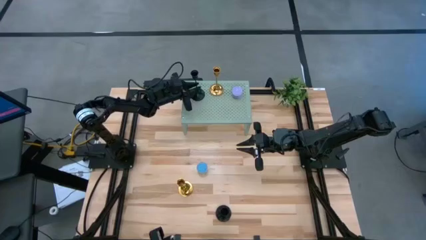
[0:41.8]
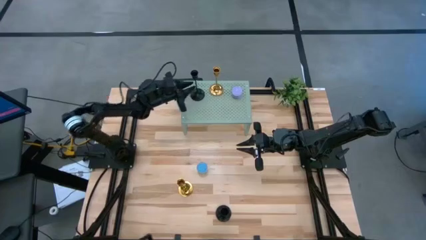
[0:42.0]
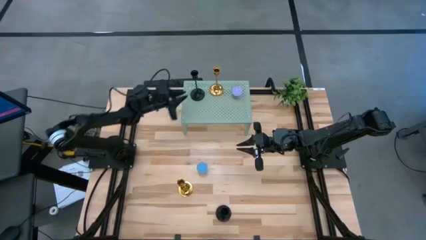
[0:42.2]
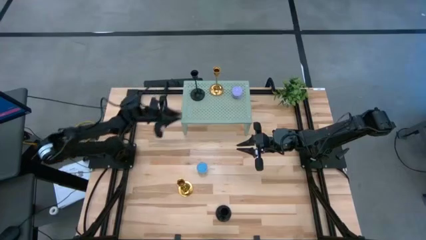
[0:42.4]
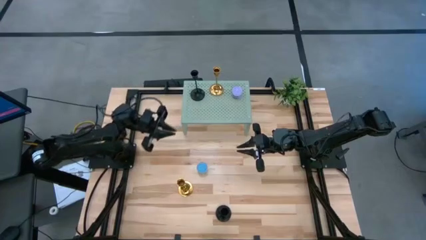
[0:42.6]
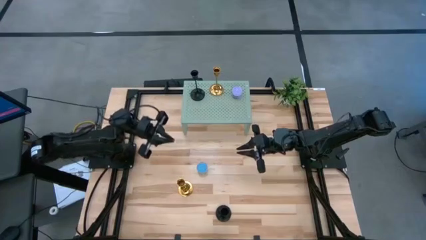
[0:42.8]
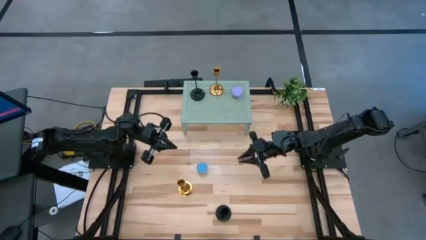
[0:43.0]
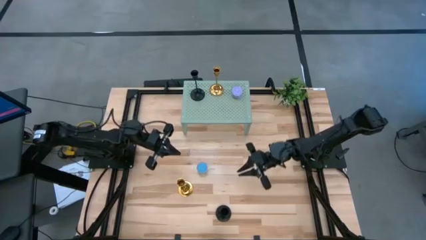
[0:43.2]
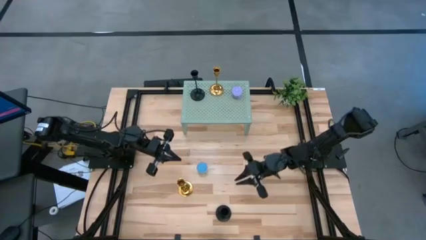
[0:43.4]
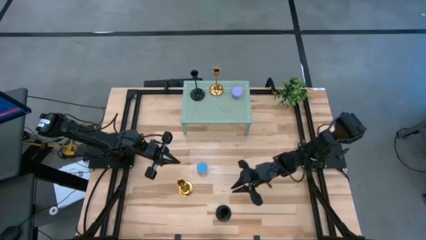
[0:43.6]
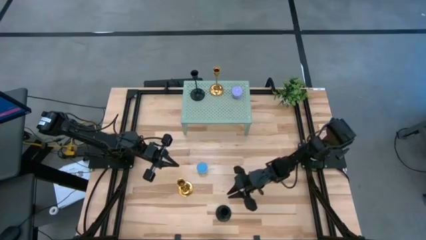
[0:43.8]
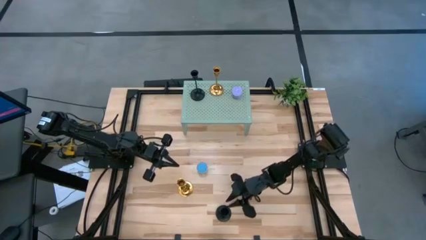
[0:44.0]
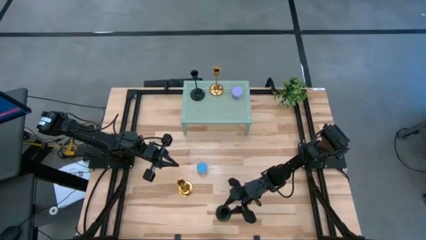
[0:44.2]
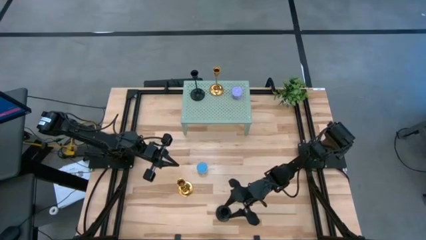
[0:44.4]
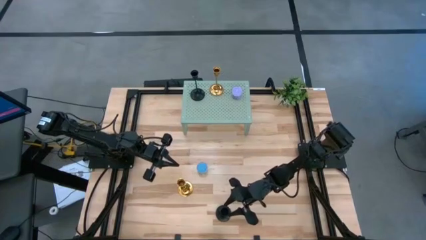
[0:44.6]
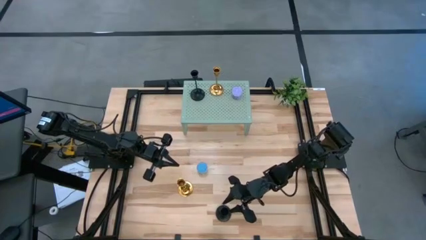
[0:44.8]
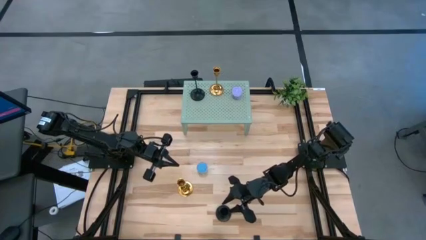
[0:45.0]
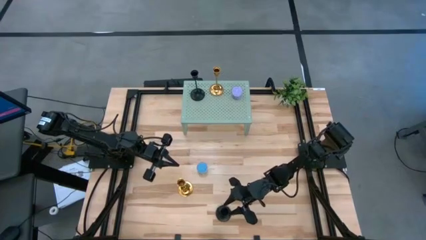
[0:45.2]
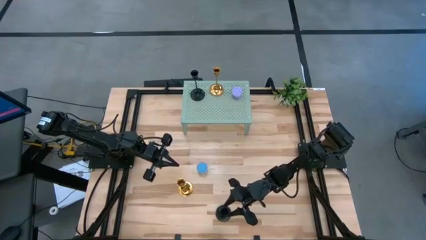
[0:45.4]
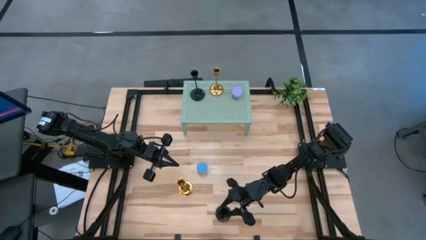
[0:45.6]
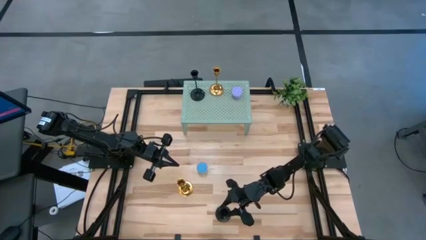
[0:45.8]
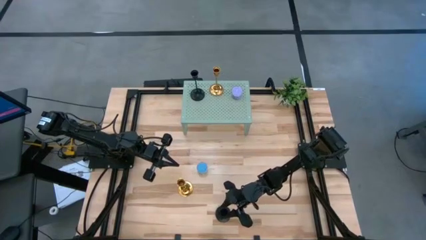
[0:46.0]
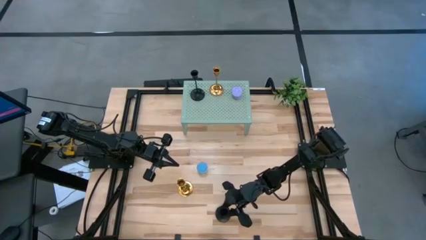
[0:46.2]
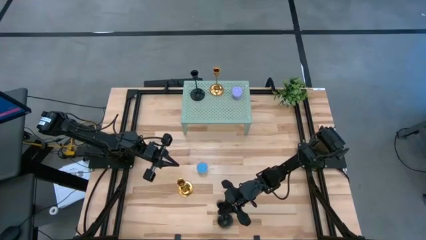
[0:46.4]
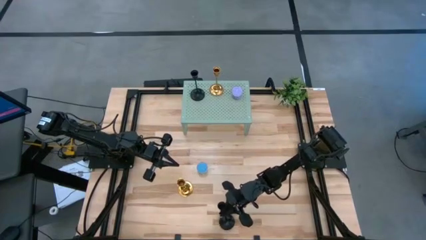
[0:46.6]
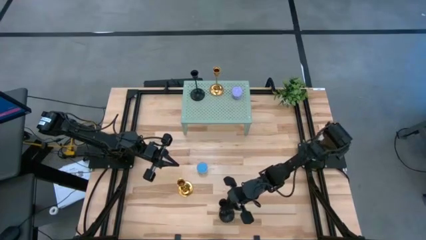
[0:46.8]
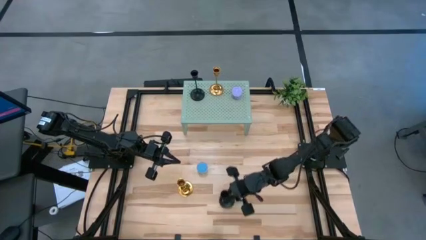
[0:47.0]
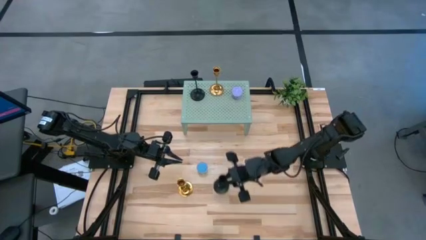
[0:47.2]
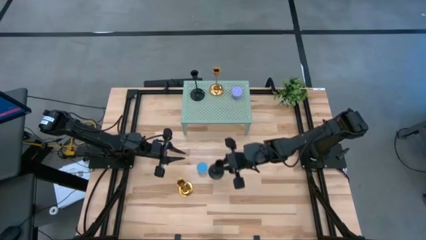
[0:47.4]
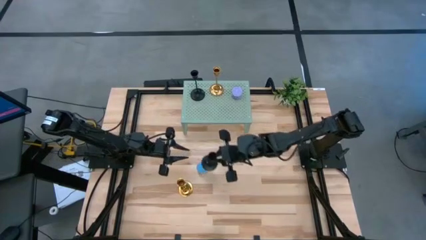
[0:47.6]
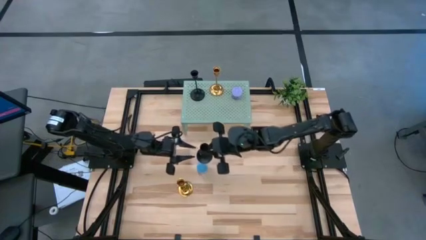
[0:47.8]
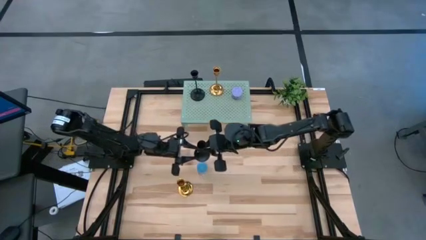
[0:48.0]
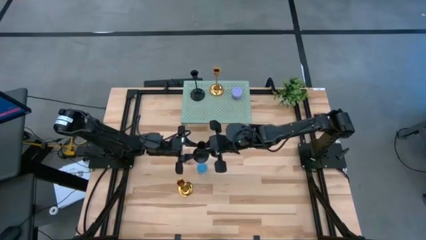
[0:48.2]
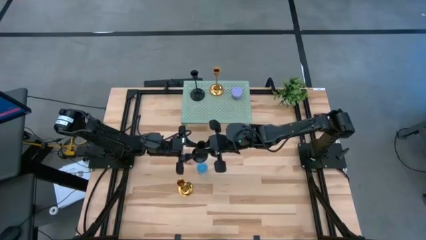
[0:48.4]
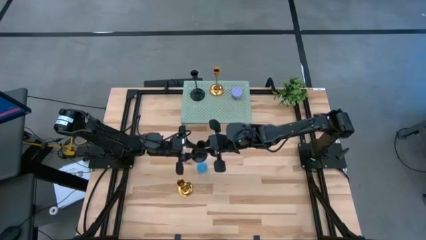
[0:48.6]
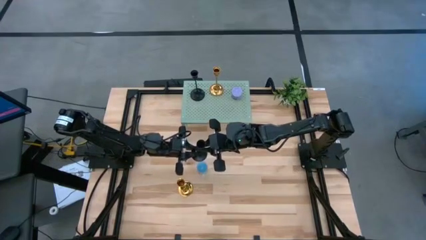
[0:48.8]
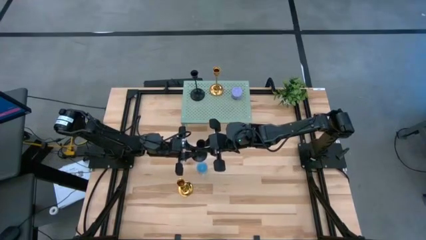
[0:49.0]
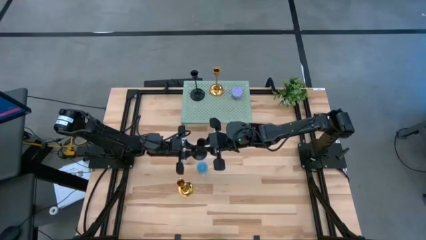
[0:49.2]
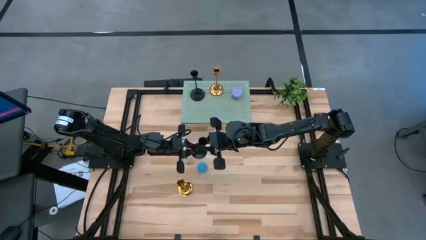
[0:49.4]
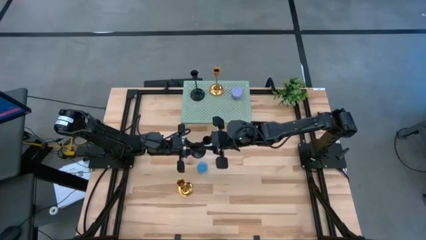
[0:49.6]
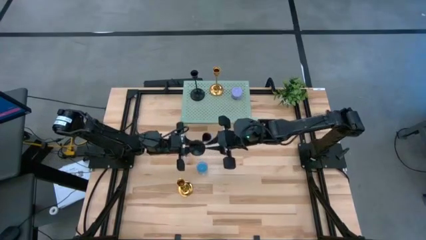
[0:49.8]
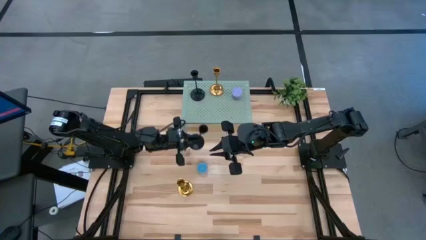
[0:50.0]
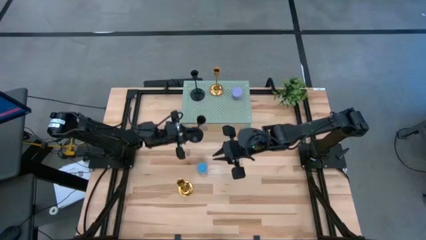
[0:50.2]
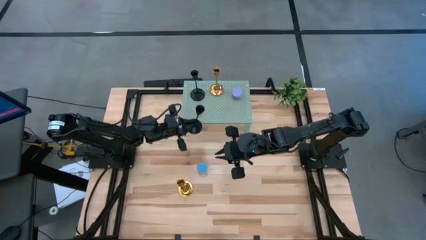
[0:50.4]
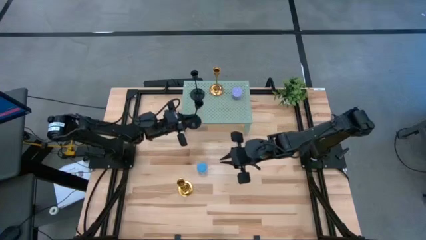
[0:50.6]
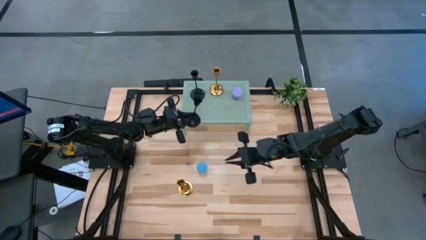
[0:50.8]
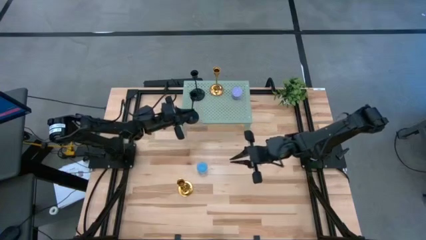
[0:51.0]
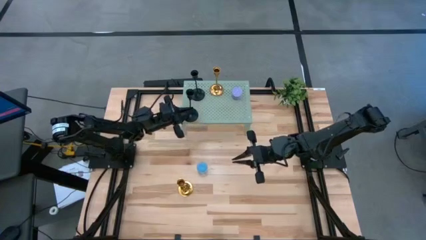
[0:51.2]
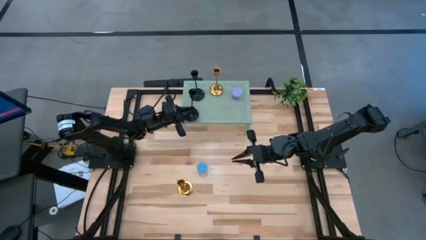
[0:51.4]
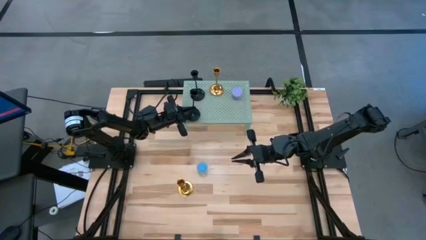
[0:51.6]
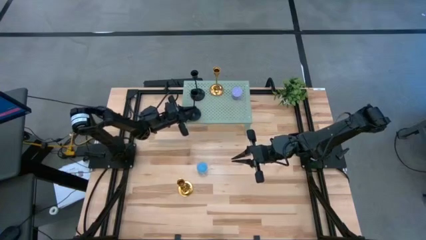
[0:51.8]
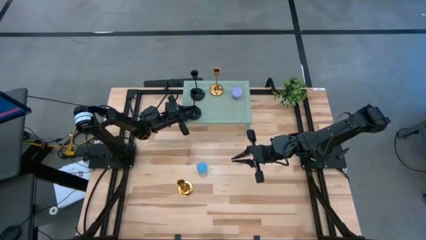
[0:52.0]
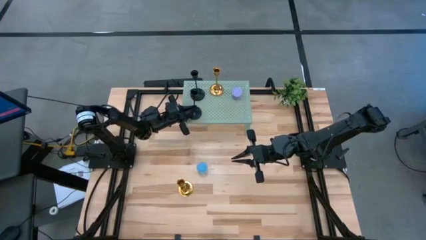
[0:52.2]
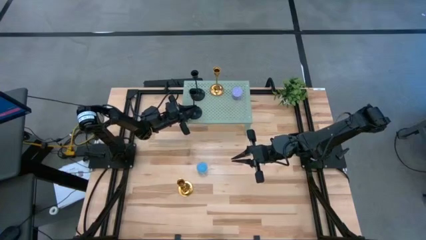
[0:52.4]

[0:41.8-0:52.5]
Task: Pick & Place candle stick holders
Put the black candle holder on the shelf aligned with the black candle holder

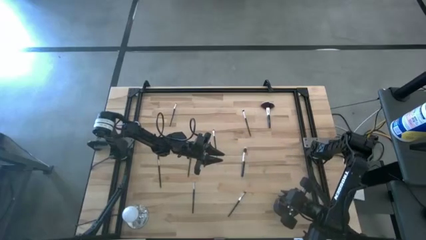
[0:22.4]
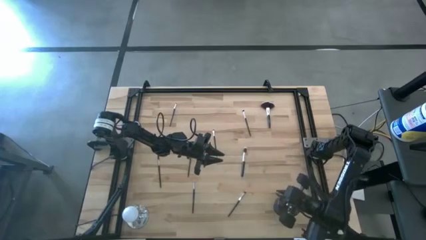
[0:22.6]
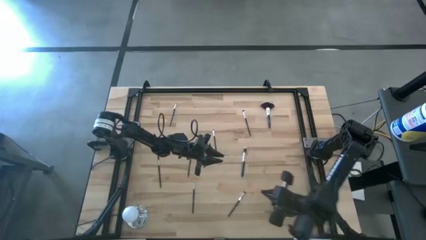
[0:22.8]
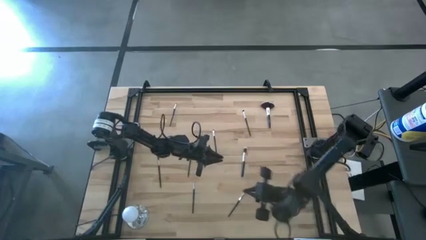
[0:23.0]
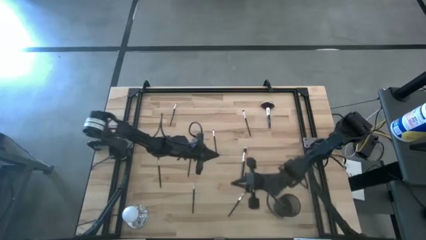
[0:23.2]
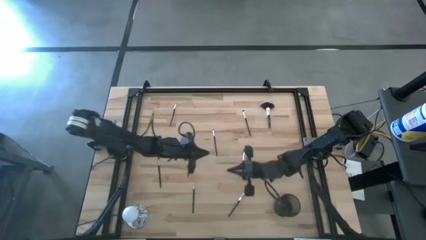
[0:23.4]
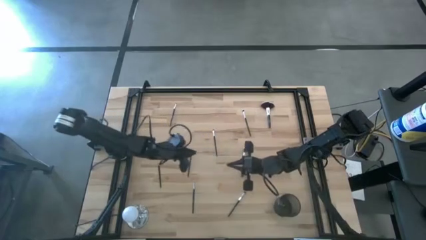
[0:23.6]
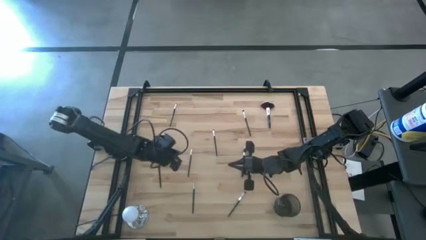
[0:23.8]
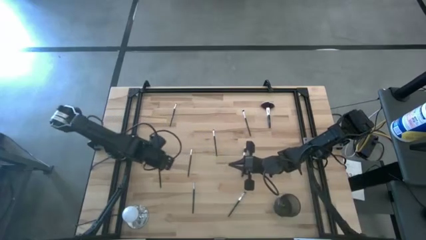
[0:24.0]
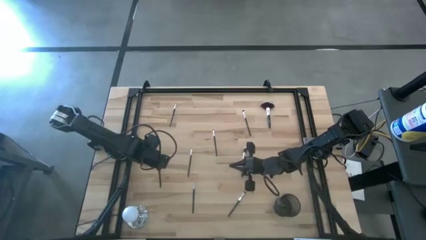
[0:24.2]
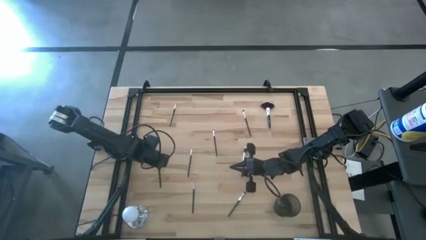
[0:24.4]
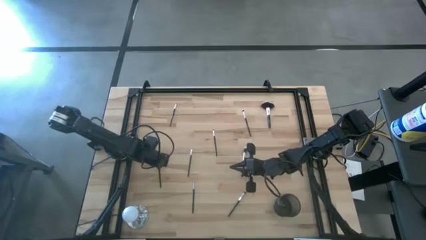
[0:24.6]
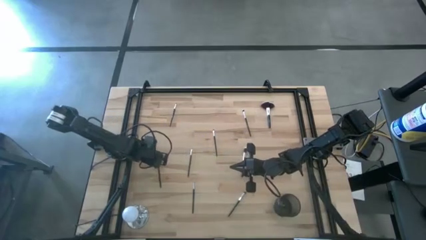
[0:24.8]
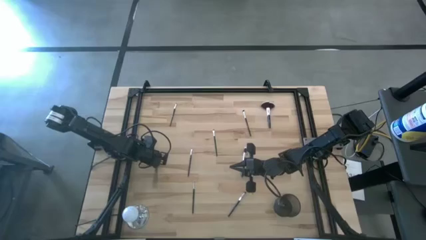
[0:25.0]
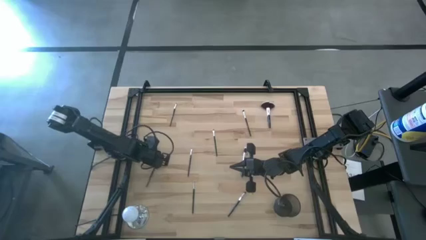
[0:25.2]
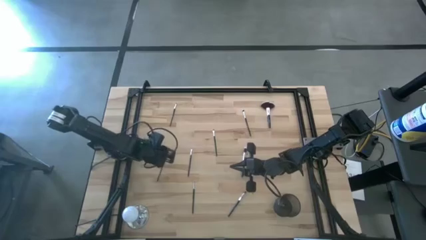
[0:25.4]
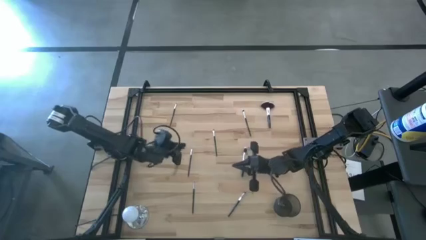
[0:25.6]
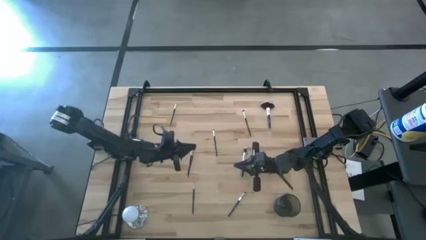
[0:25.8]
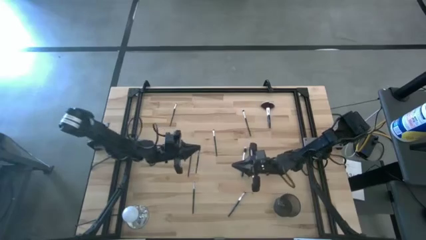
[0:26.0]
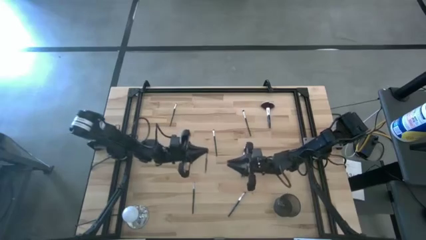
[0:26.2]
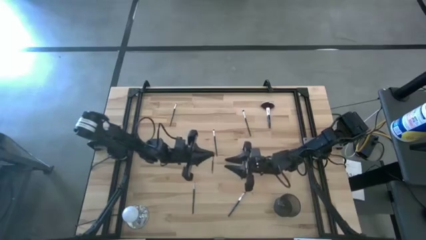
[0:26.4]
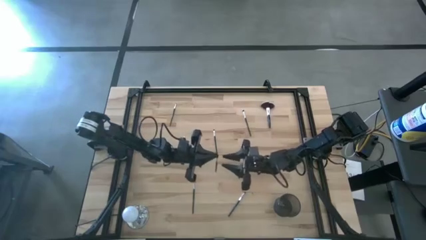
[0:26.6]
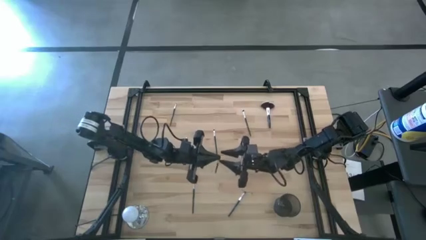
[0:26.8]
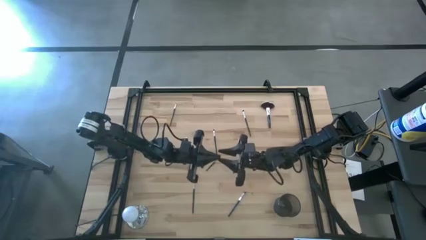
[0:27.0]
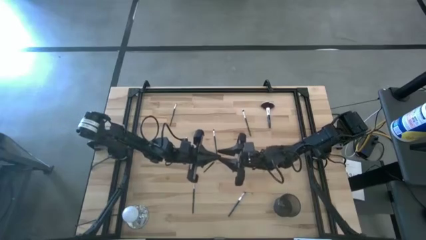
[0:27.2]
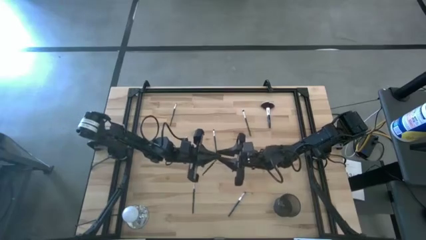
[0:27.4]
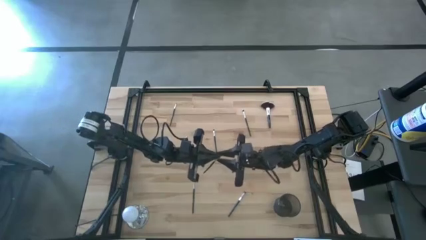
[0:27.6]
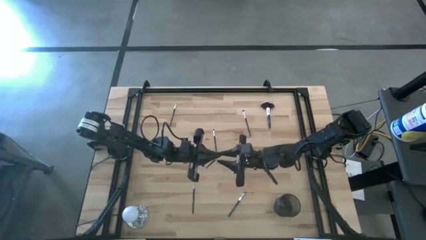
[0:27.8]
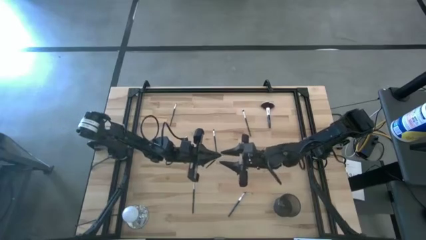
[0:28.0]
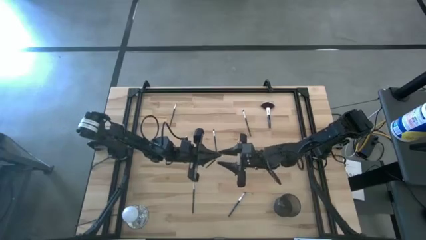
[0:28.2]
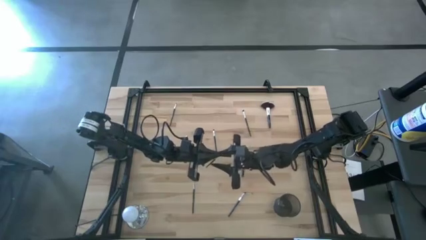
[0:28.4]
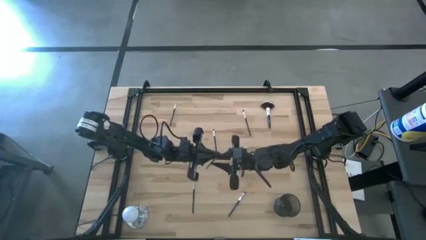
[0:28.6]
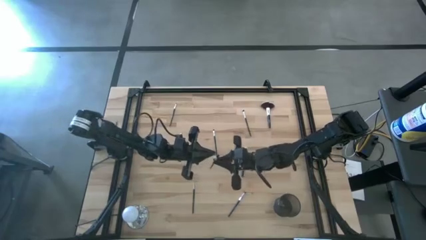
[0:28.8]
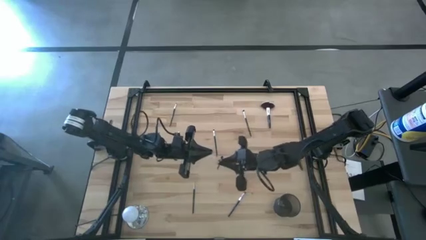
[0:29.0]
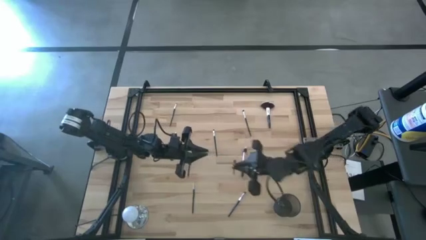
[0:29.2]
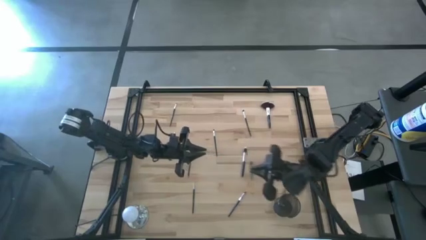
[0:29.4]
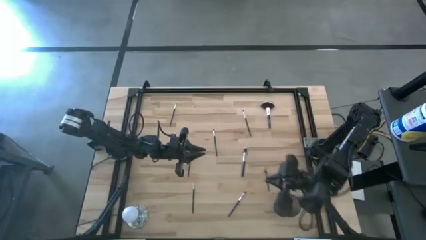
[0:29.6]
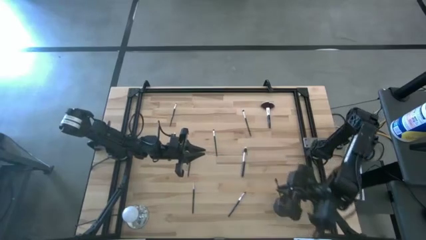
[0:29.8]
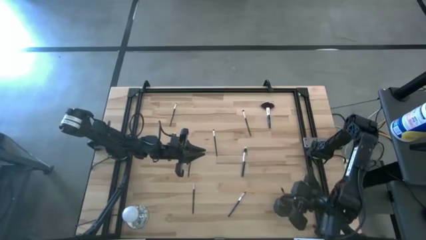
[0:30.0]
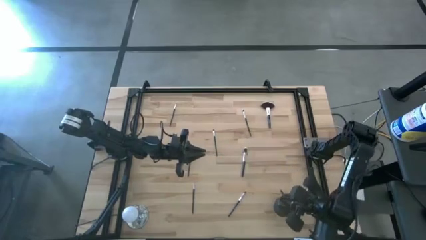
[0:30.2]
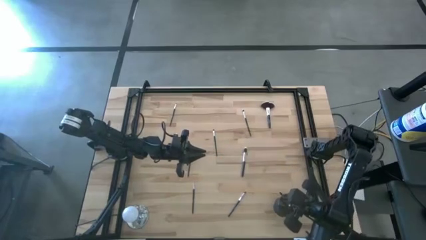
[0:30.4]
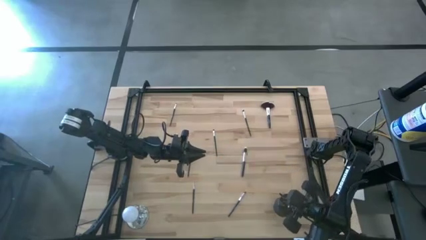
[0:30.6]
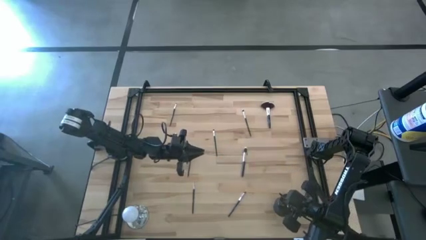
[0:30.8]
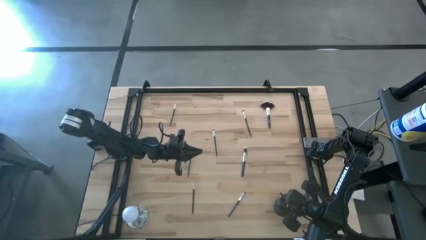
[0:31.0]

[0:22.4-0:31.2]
Task: Sort items
Put the lash brow brush into the wire basket
